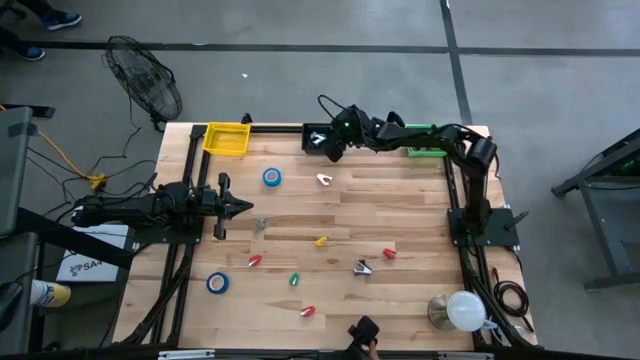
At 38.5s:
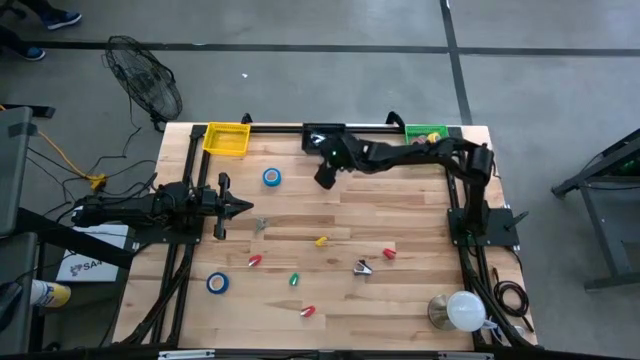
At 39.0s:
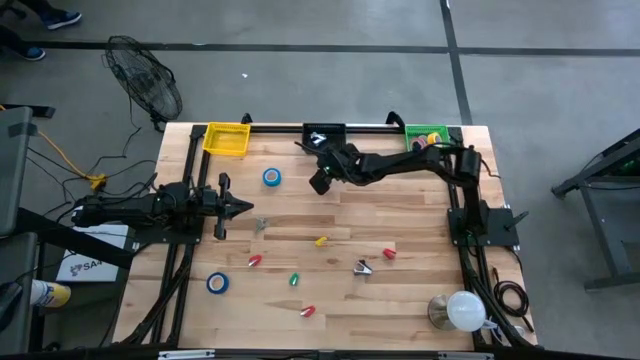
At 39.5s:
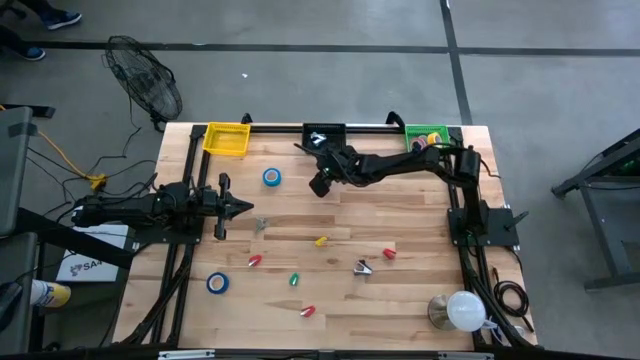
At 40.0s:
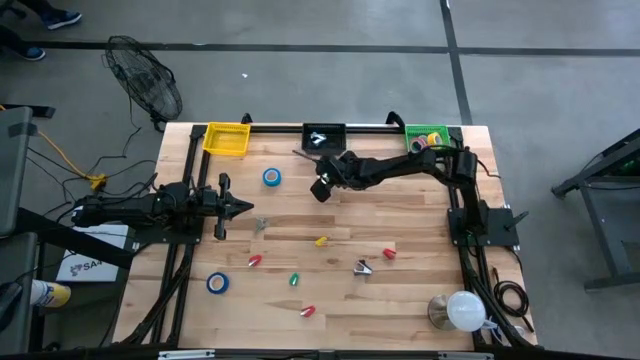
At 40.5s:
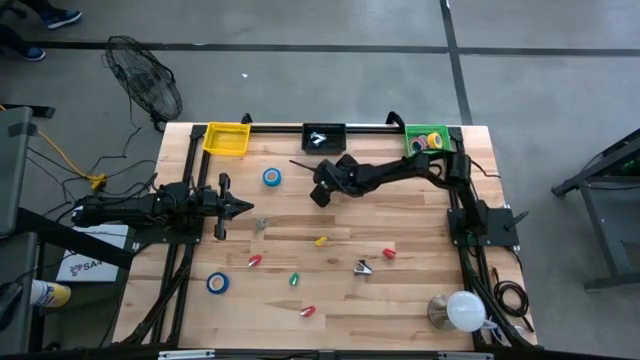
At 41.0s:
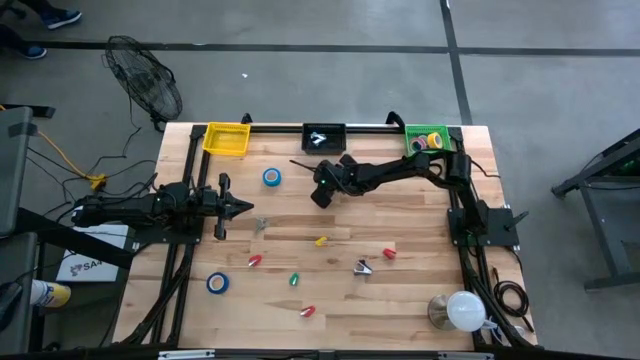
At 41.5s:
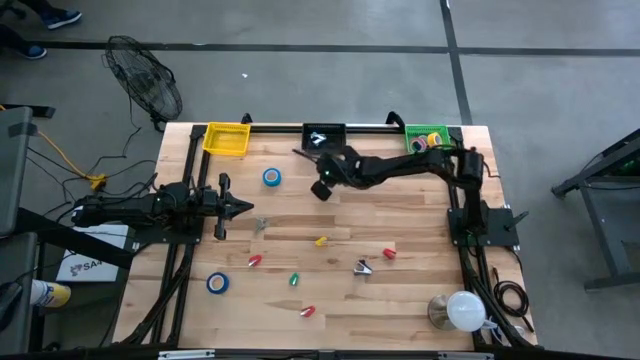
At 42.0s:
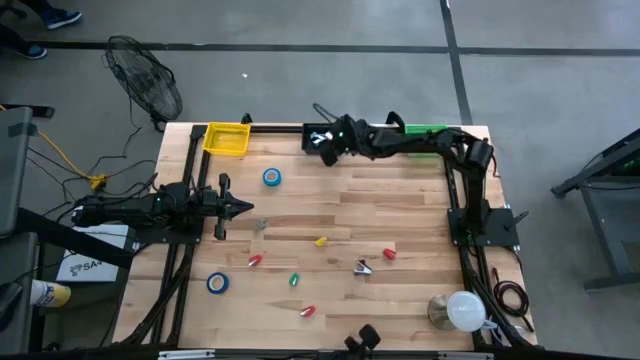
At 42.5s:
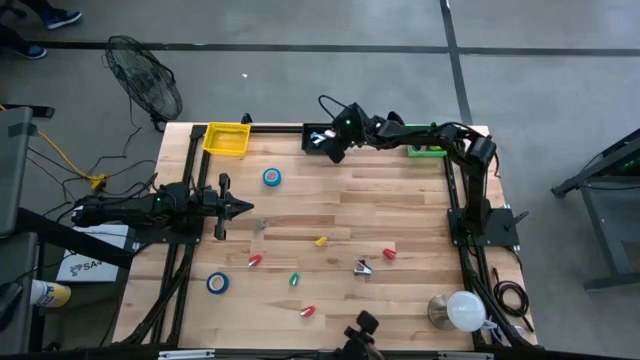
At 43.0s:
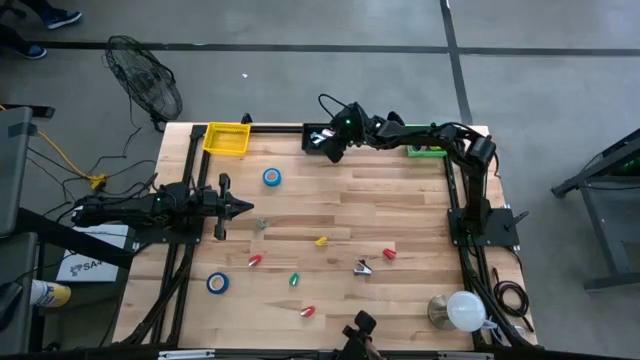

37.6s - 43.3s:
Task: Pick and place Stapler, Stapler remover, tape
Put the pink staple remover into the black bin

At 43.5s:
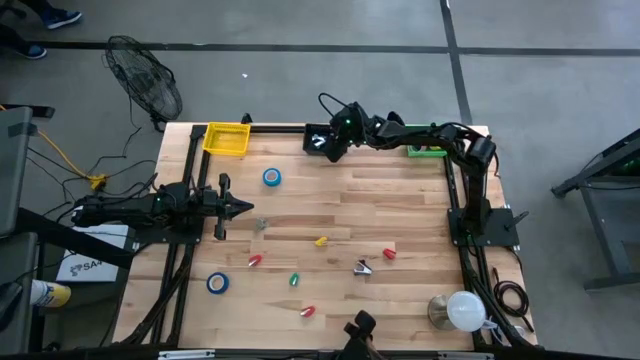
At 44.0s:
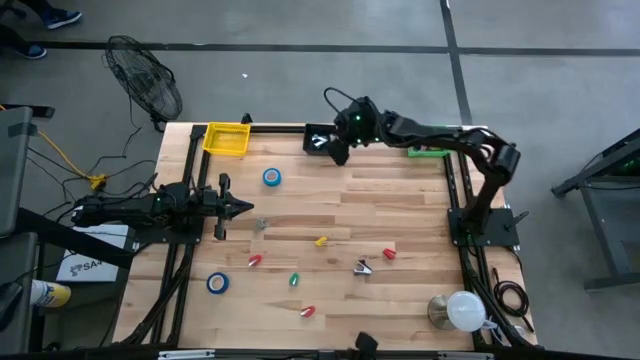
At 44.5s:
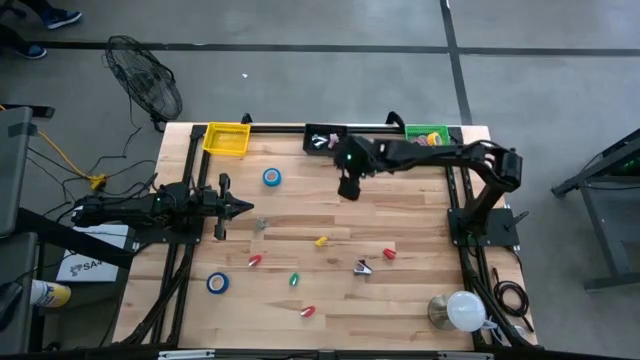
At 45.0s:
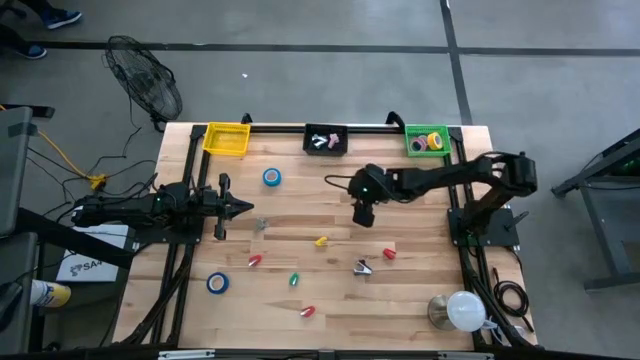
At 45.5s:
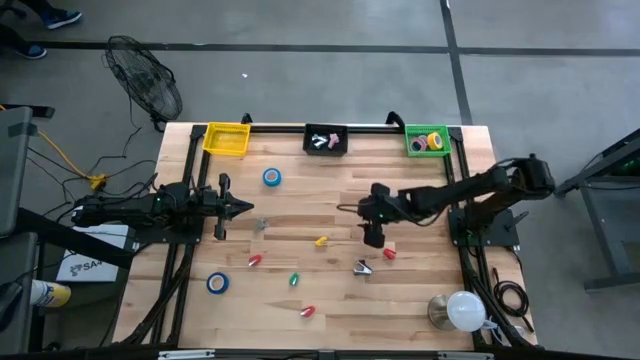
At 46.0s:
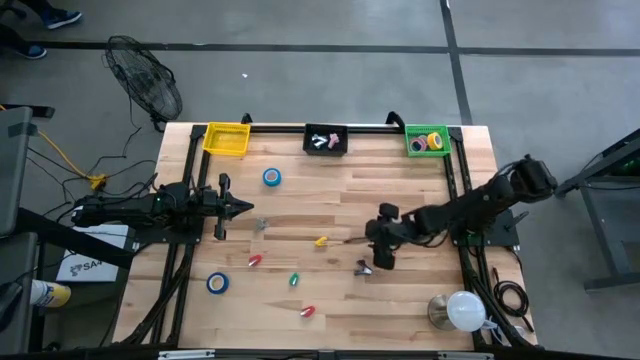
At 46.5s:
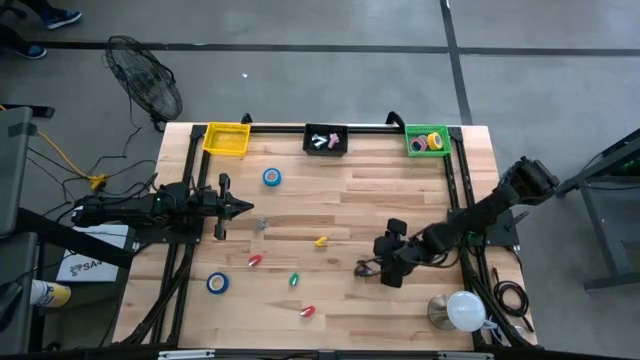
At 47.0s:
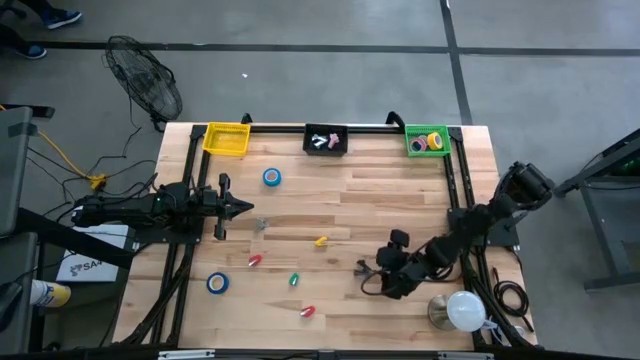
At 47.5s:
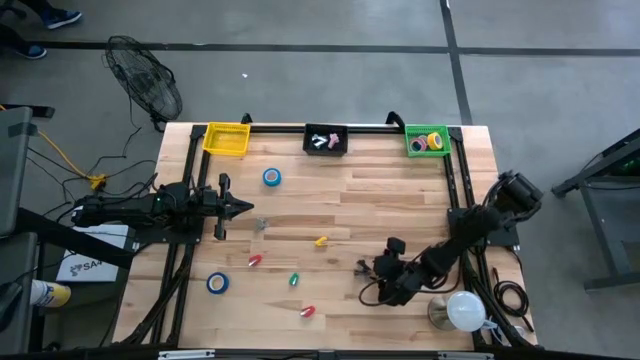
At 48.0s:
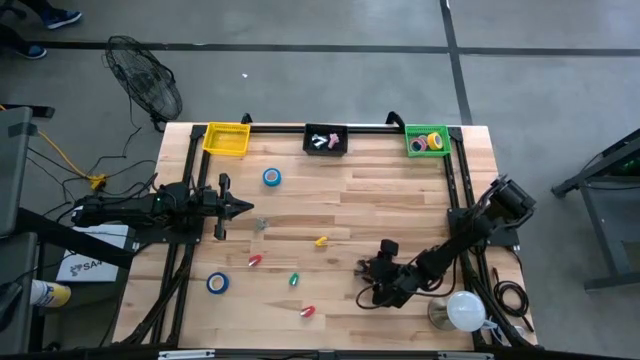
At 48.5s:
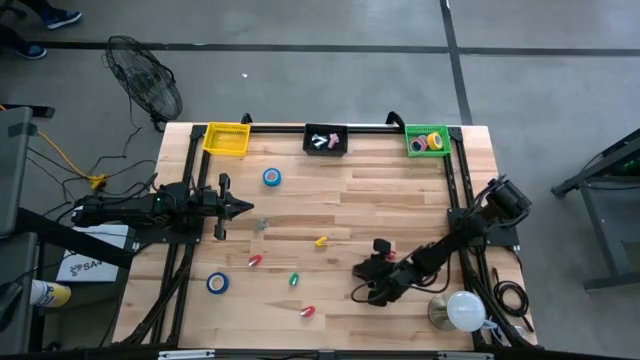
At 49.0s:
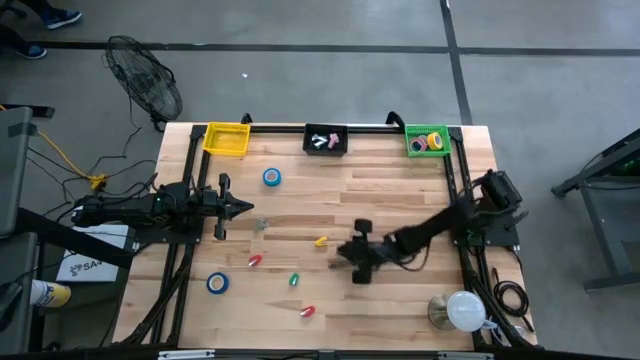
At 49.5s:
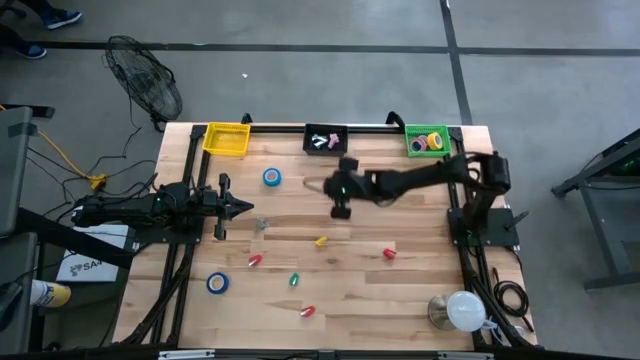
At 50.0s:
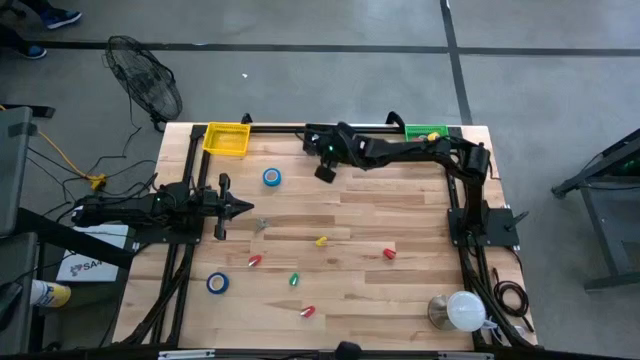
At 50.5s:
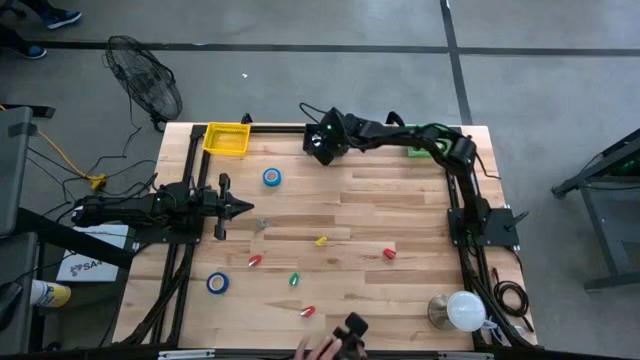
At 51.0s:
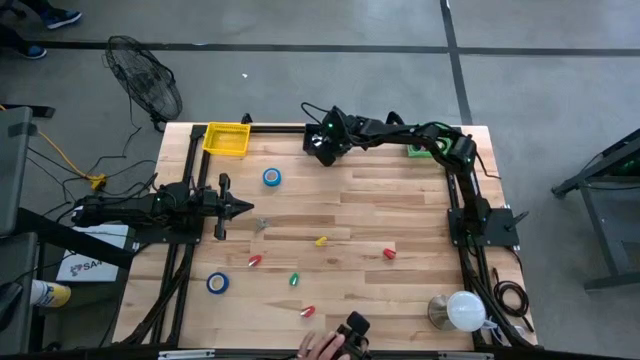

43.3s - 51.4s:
Put the black staple remover into the black bin

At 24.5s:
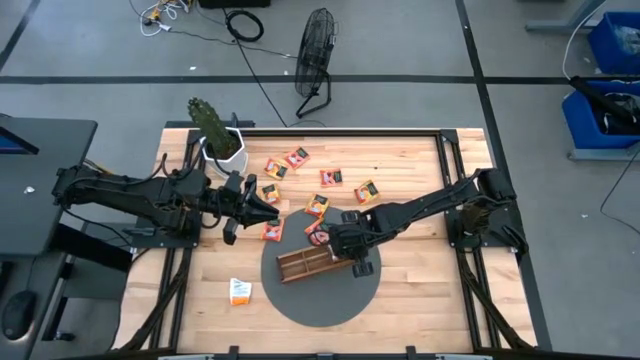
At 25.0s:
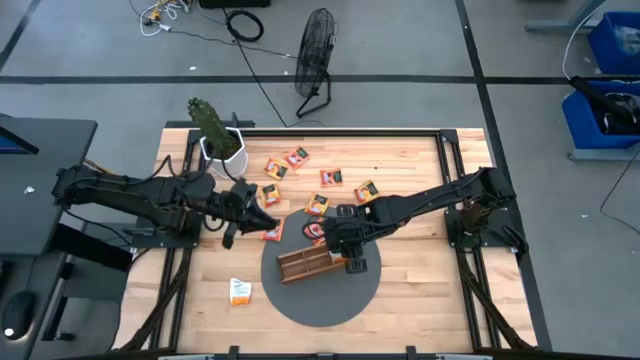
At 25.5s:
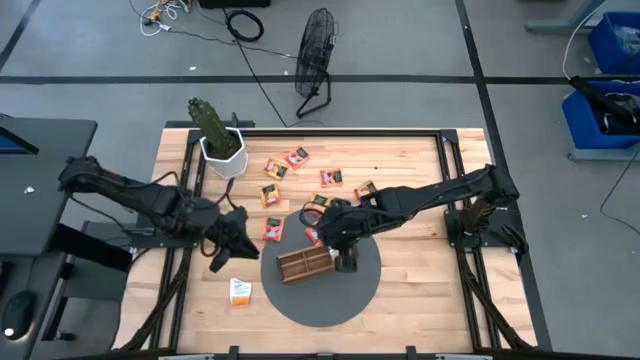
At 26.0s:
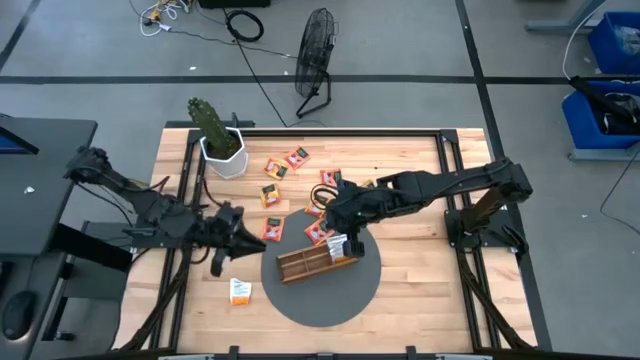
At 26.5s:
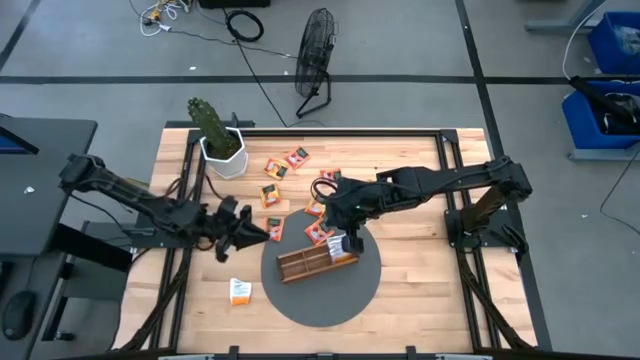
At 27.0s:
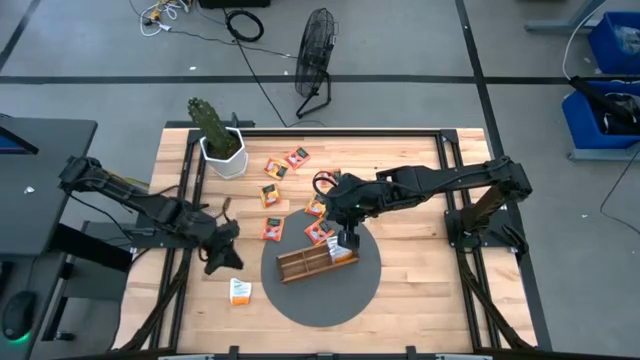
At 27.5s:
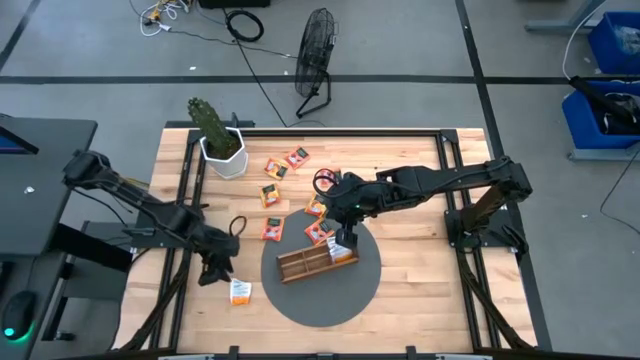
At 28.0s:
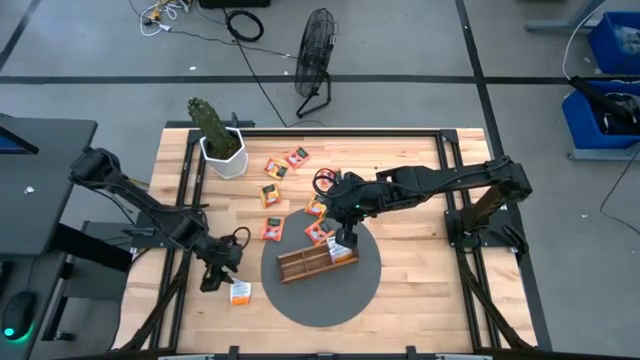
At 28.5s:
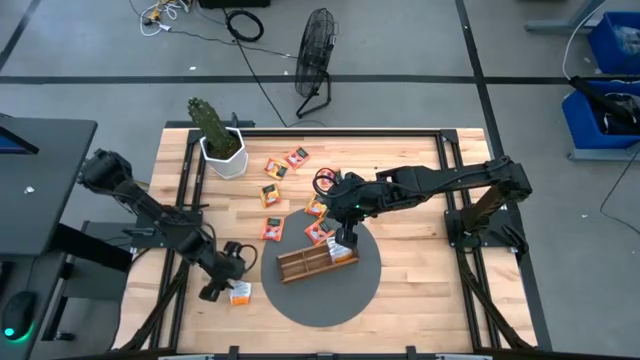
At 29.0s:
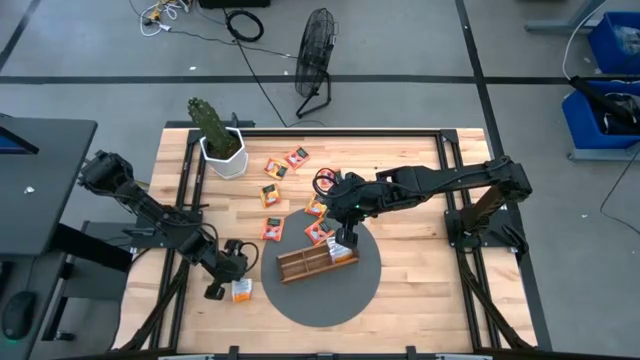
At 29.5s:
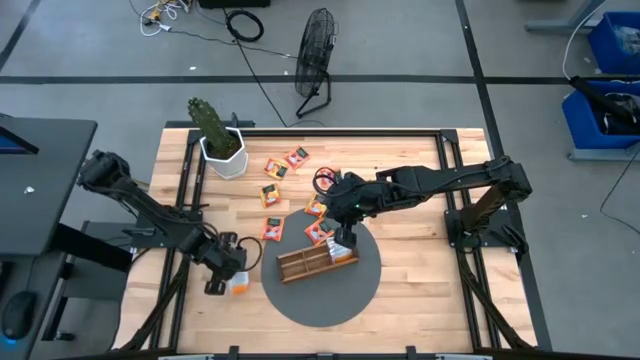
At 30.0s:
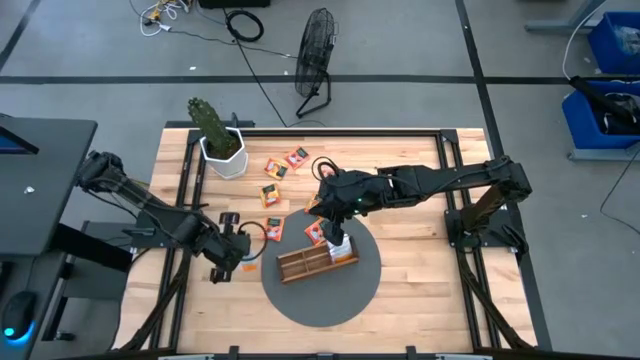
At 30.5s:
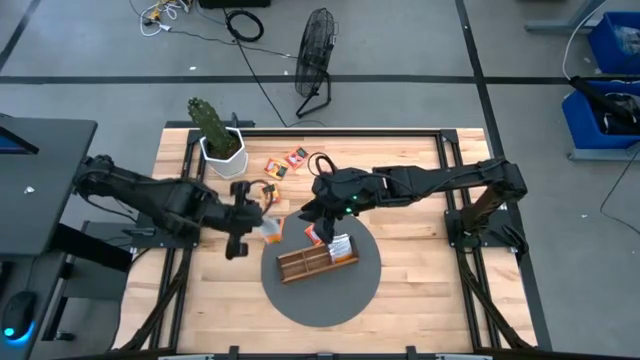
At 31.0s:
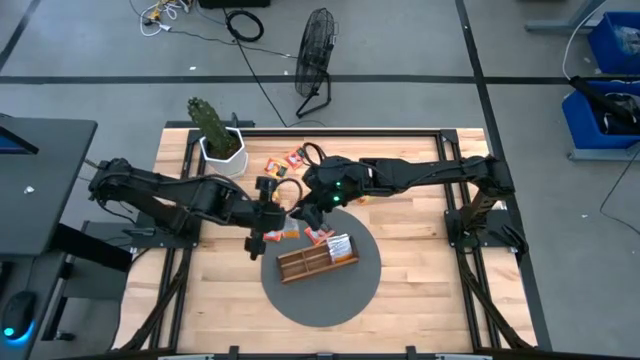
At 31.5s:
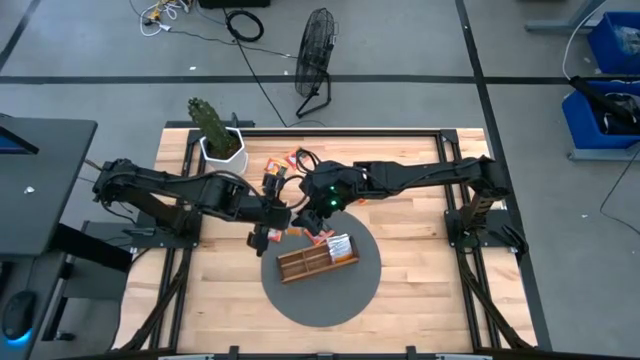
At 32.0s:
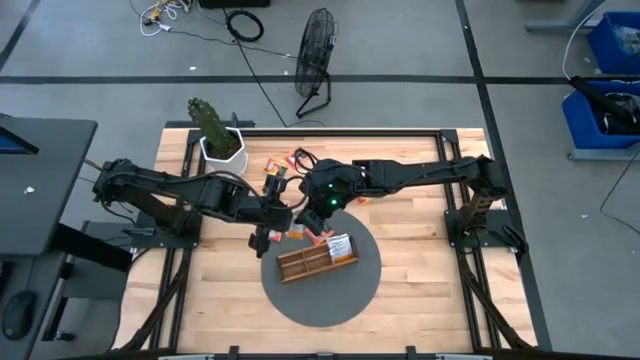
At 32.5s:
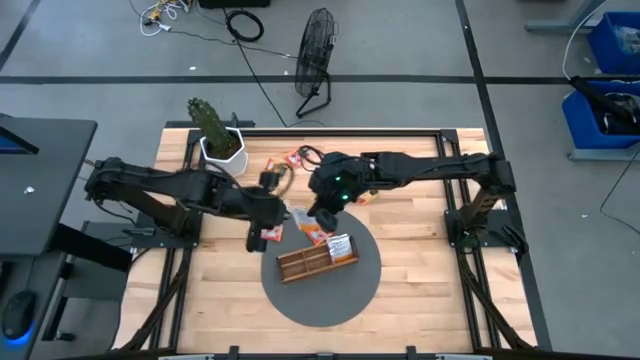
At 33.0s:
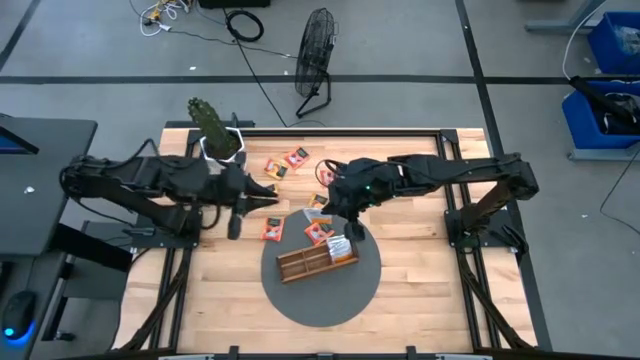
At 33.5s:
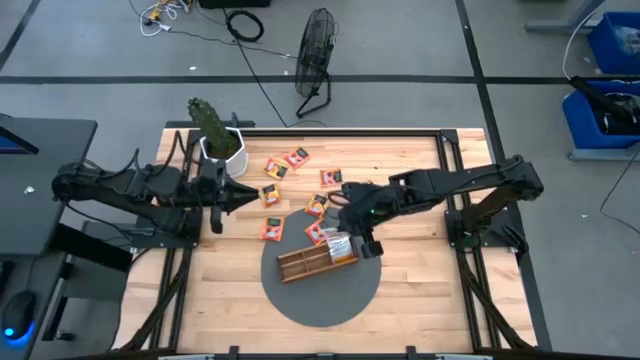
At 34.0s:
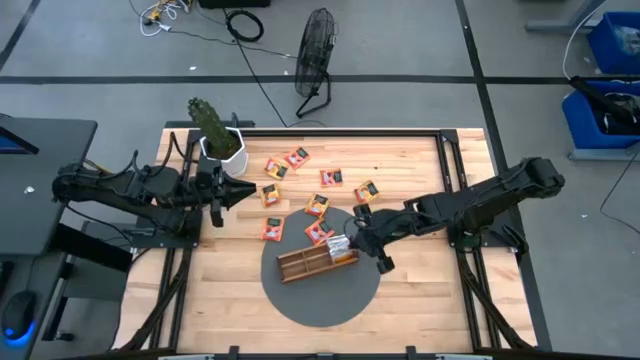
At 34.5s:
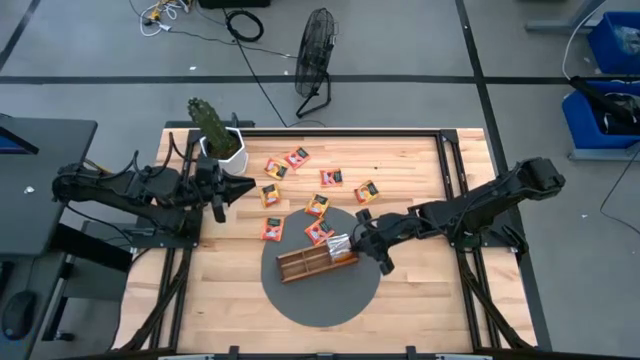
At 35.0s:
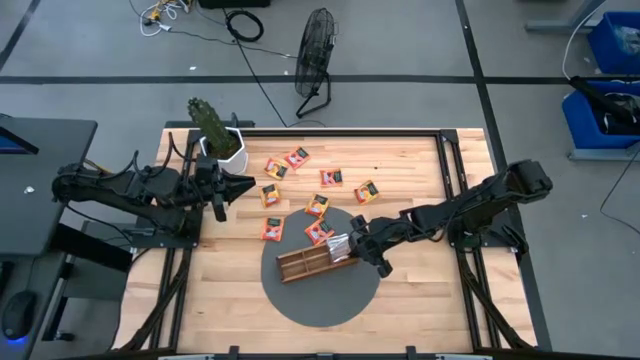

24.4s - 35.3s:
Task: Pick & Place Tea
Put the white tea bag into the right section of the wooden organizer
